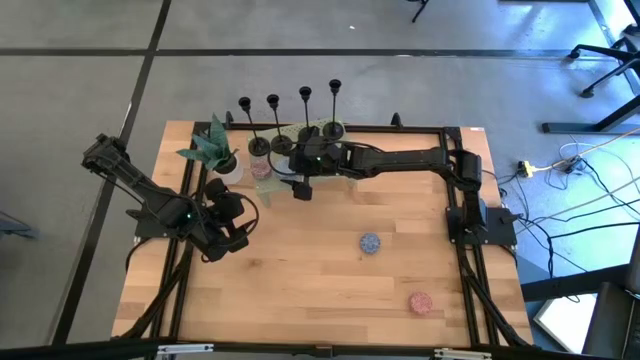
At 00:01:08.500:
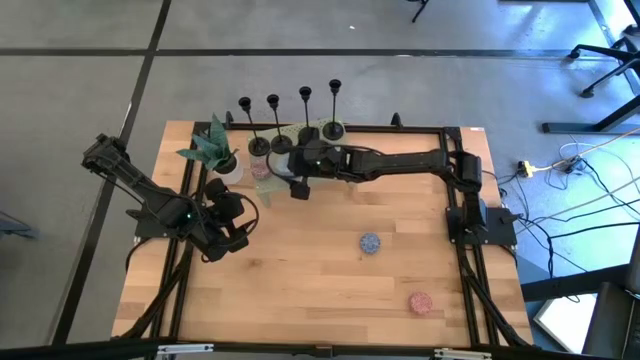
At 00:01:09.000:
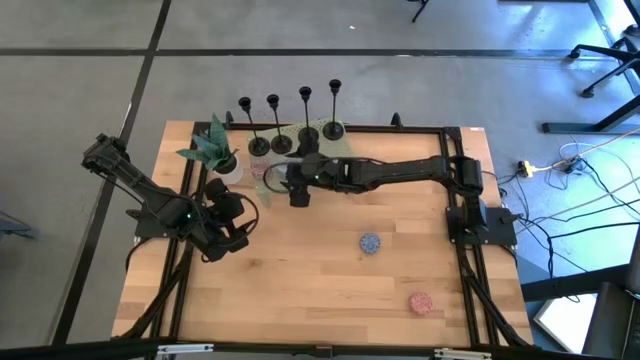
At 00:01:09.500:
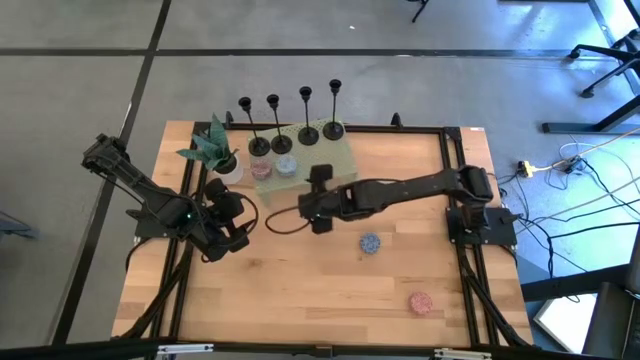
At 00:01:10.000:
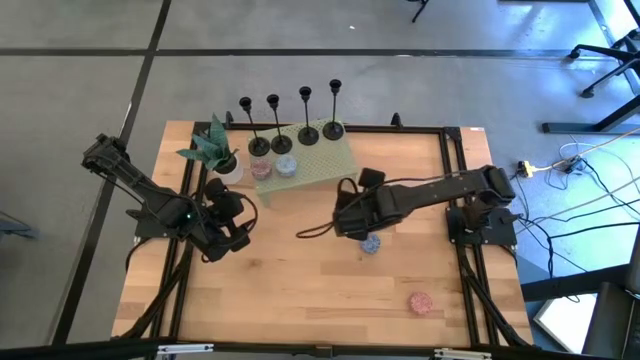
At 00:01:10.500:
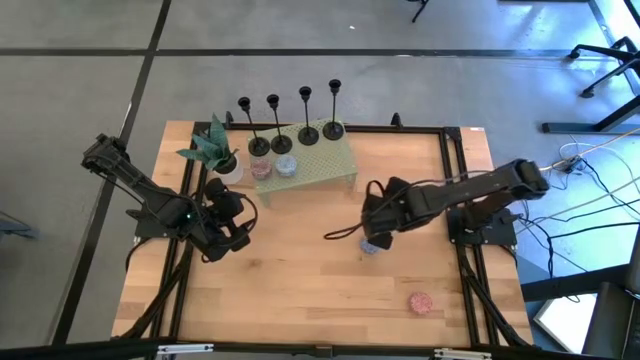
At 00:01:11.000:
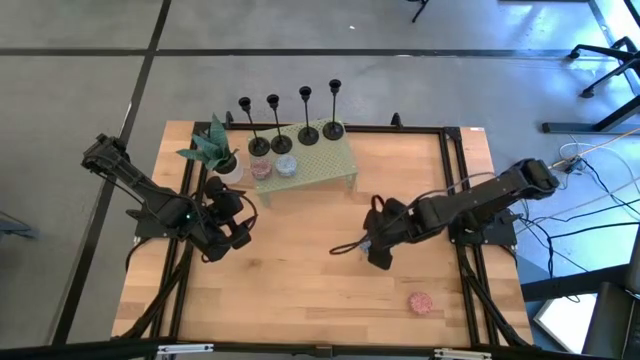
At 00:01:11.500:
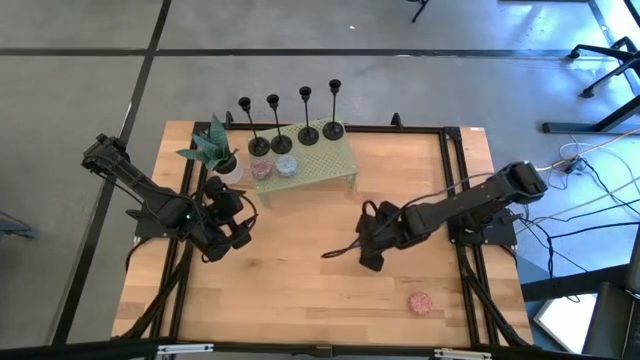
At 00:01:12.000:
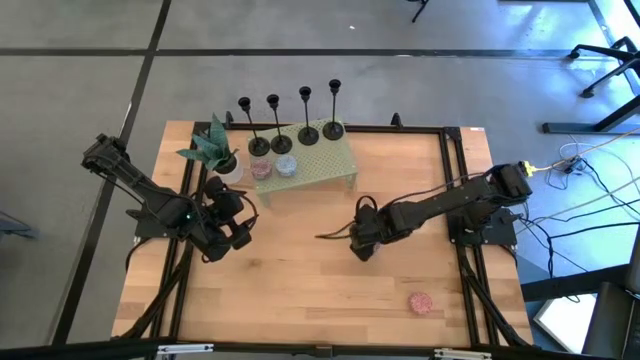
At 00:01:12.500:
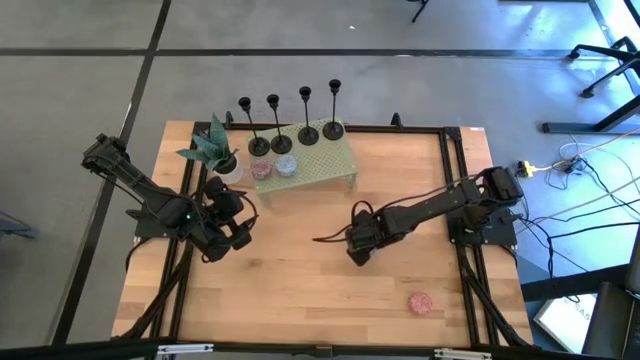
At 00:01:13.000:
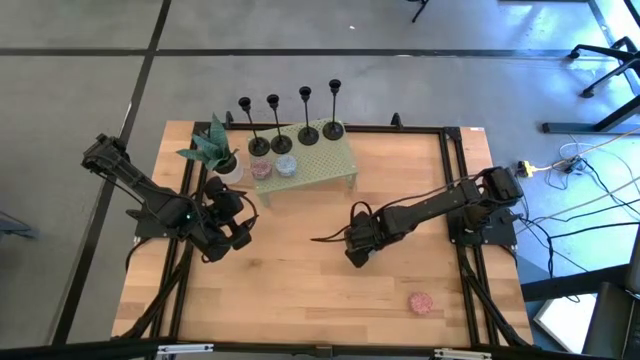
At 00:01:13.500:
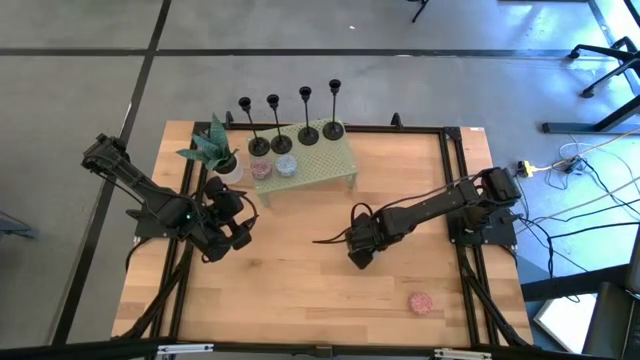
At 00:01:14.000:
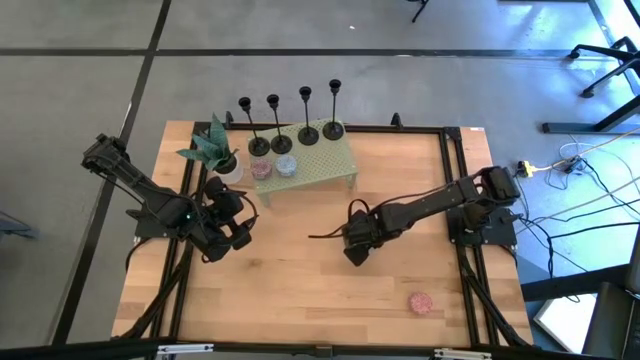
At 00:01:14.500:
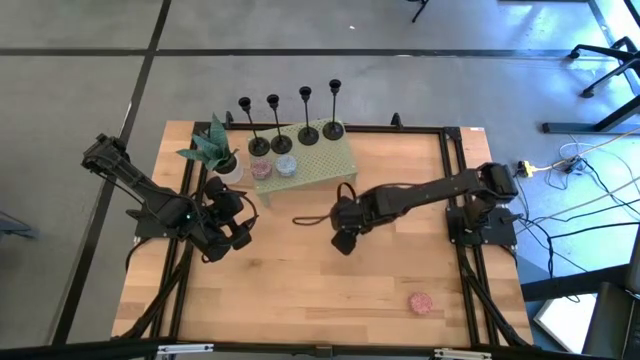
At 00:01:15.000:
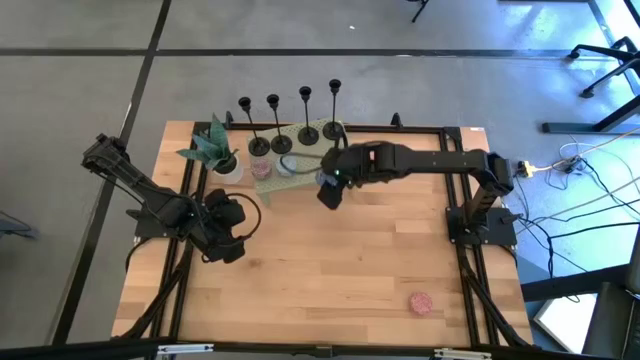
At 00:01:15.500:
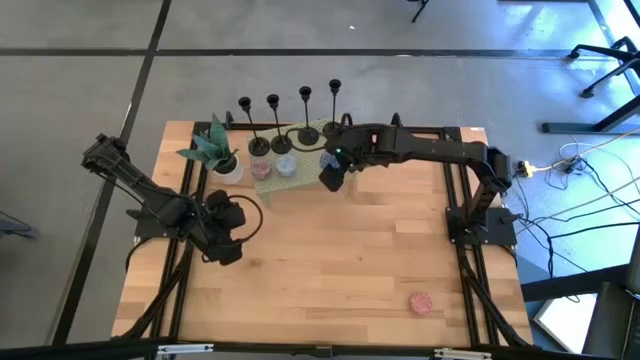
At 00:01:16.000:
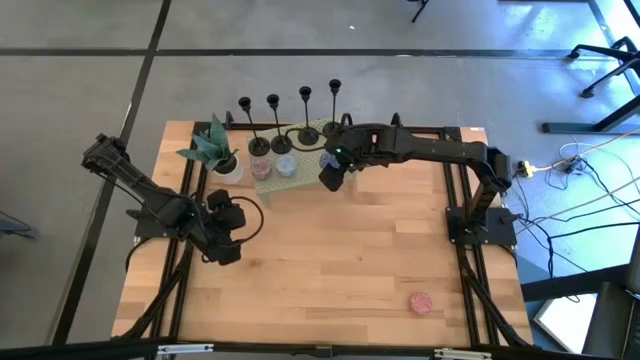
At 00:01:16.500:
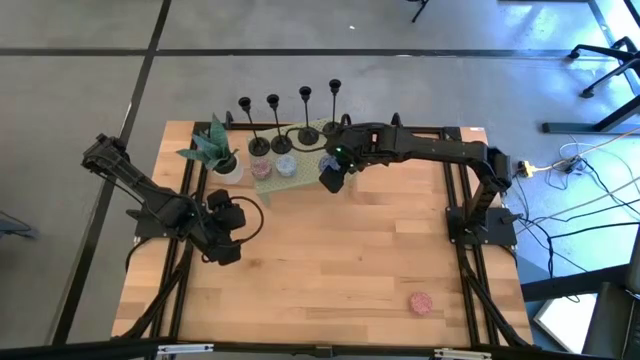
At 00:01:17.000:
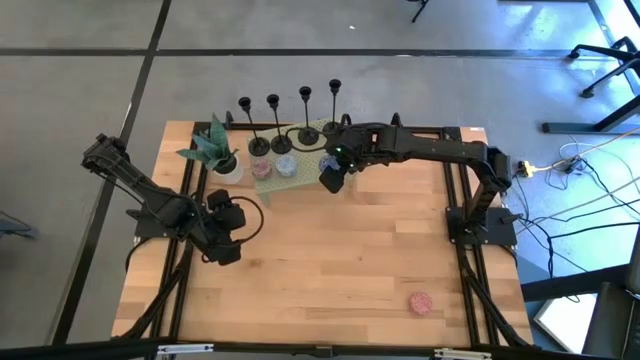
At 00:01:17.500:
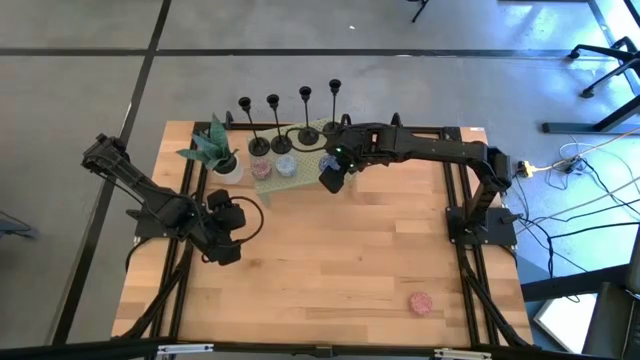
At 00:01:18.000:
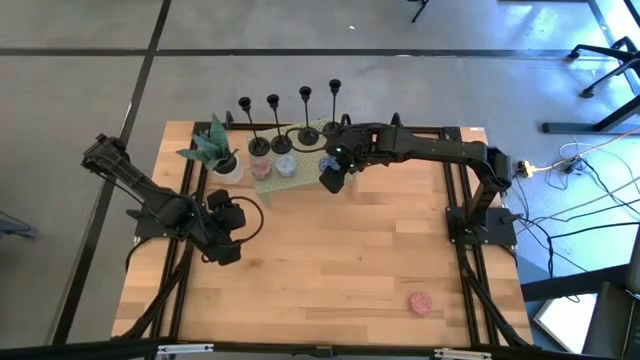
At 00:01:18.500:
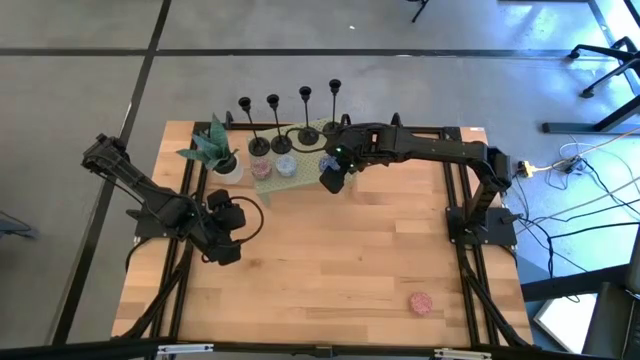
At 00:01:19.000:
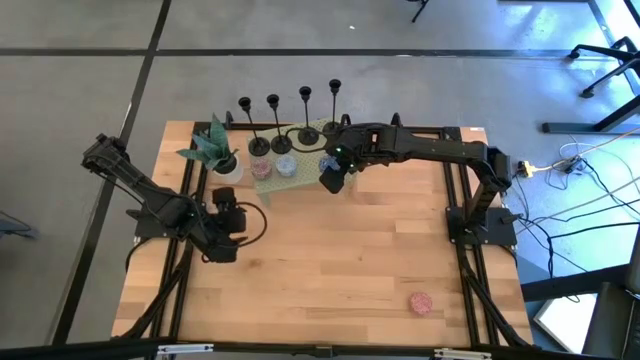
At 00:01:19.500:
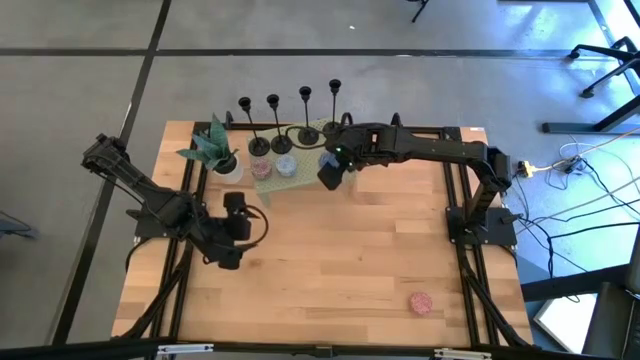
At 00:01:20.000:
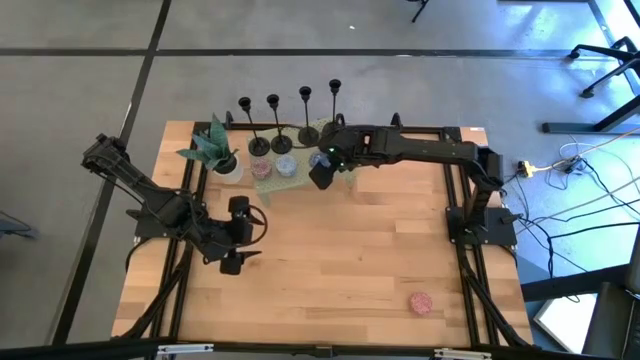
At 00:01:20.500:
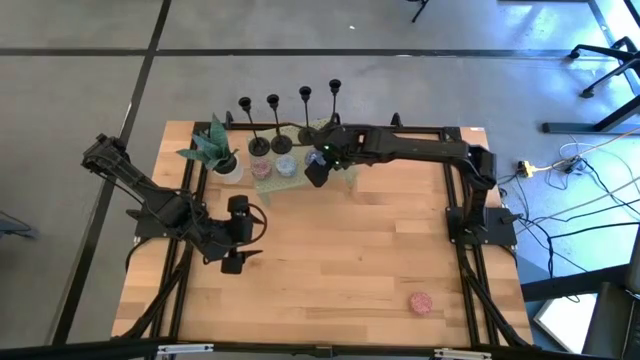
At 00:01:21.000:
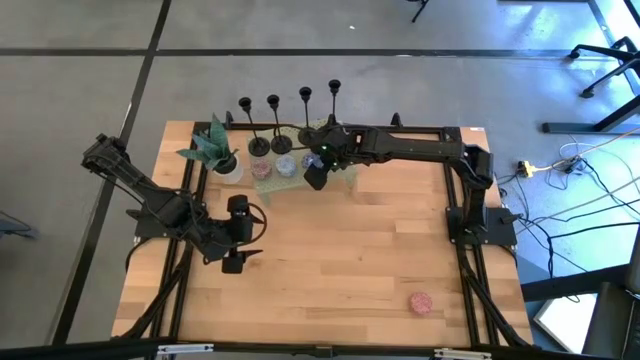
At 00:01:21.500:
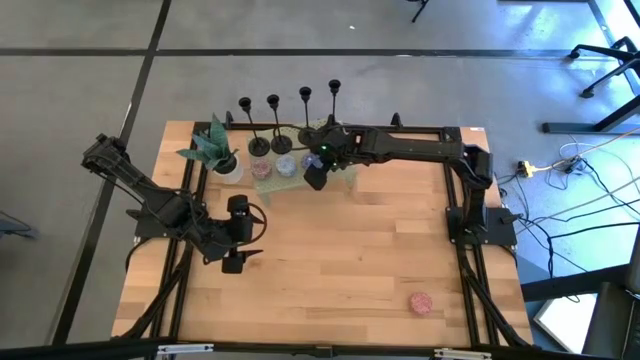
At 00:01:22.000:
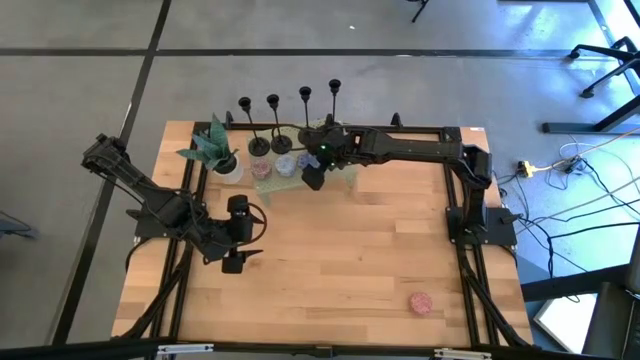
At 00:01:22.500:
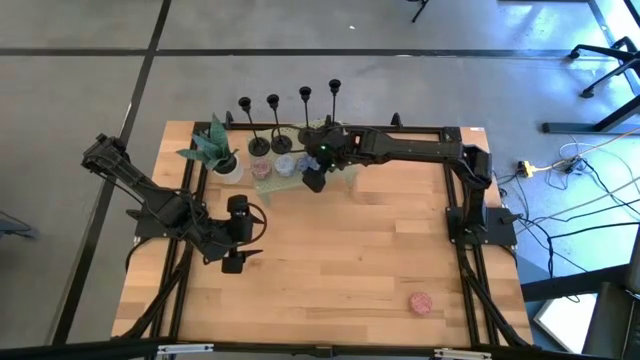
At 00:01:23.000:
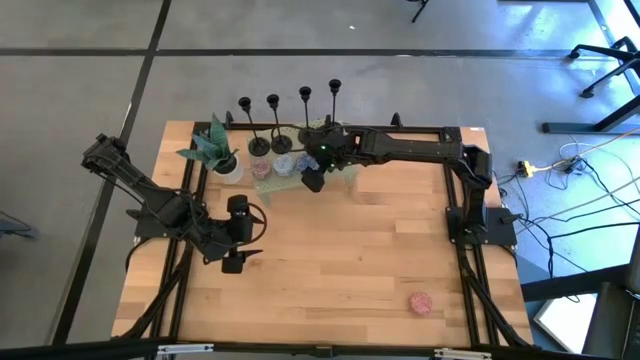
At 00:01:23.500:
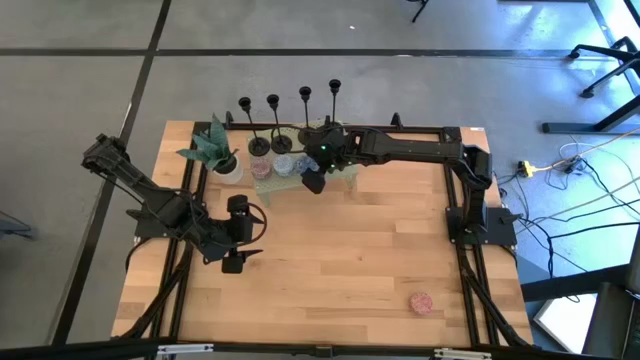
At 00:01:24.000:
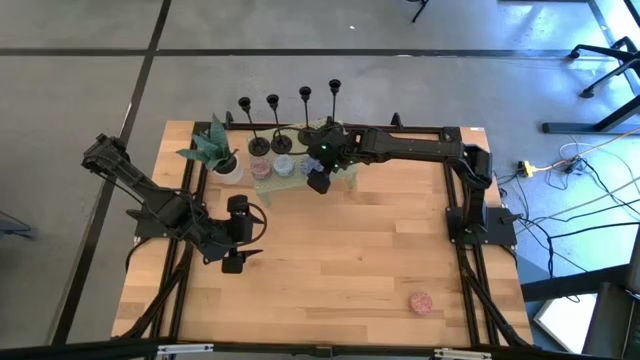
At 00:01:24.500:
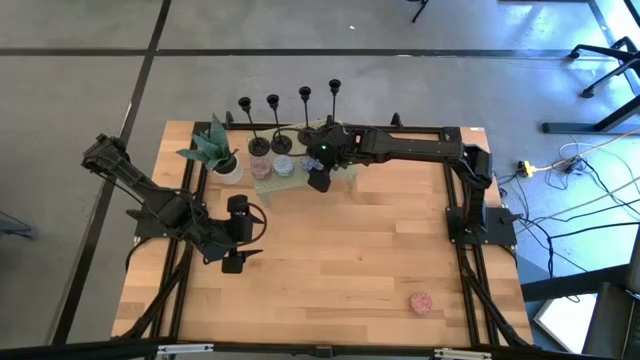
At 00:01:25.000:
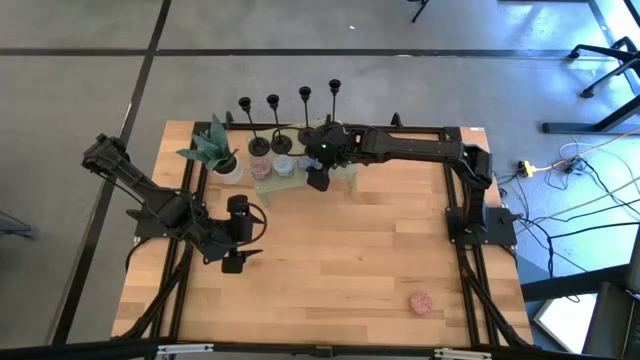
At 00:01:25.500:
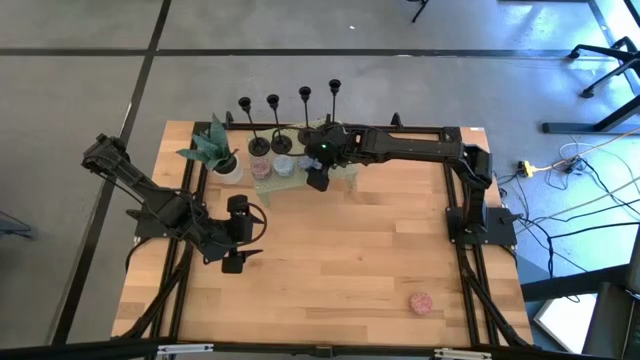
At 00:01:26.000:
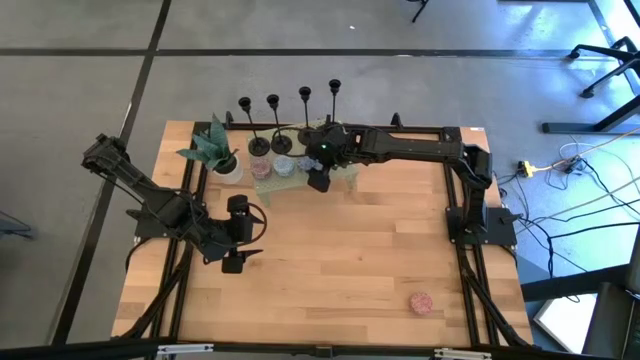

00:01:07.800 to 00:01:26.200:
Task: Pick & Place candle stick holders
Put the blue scented candle on the shelf

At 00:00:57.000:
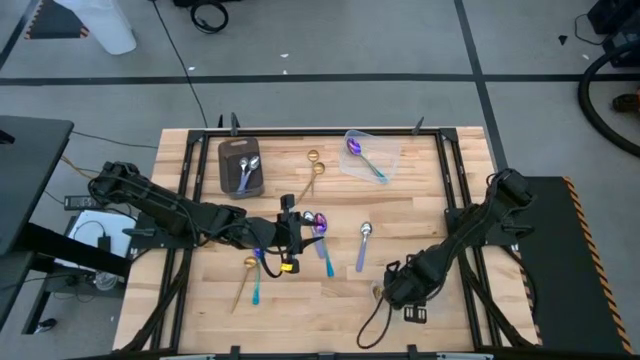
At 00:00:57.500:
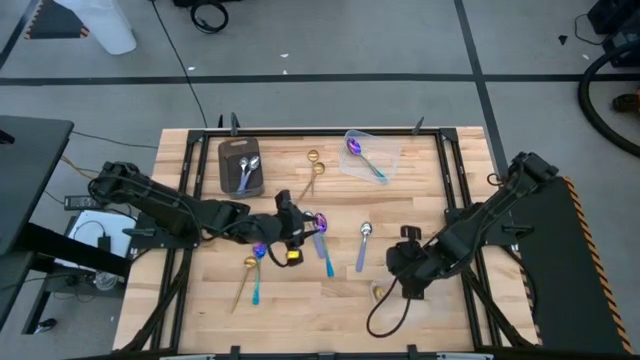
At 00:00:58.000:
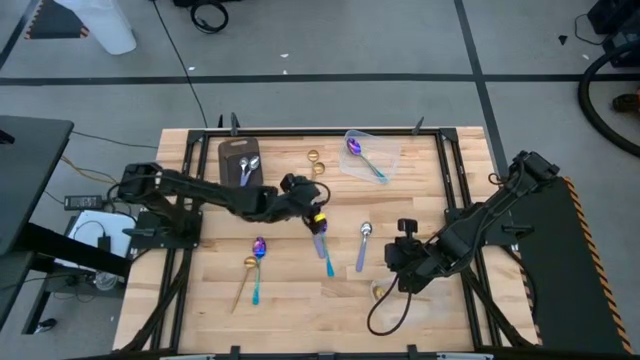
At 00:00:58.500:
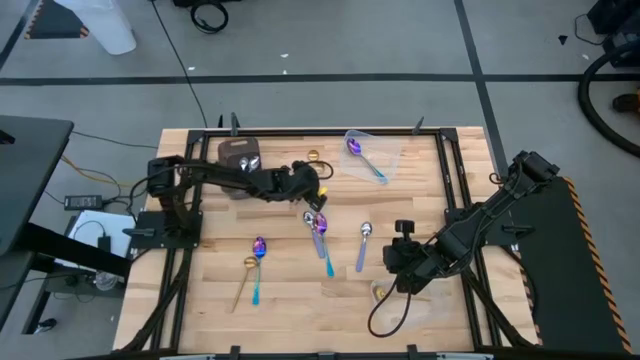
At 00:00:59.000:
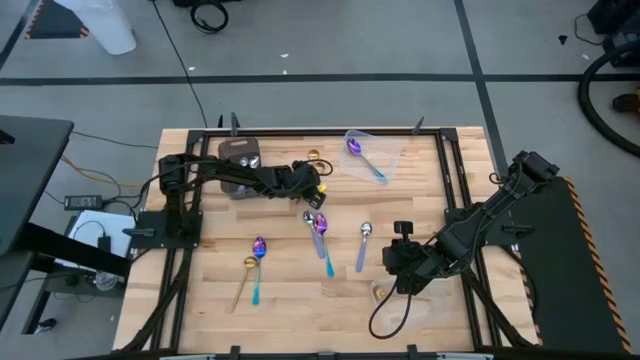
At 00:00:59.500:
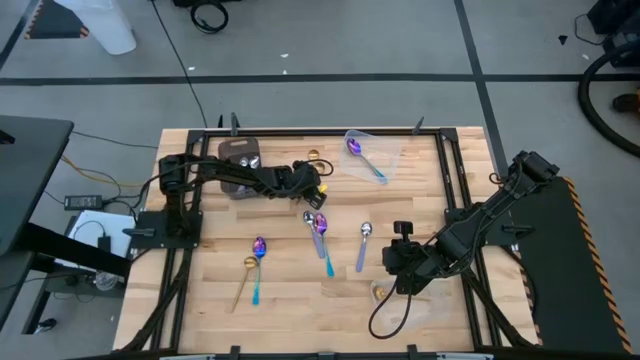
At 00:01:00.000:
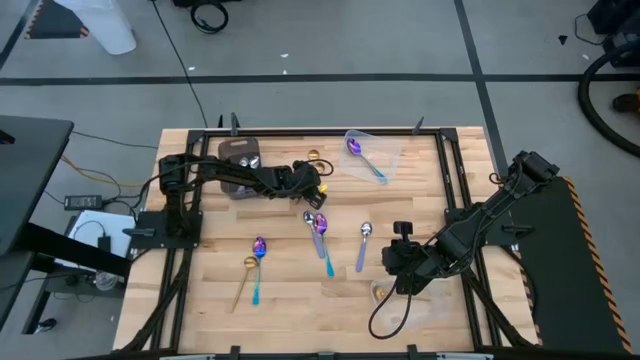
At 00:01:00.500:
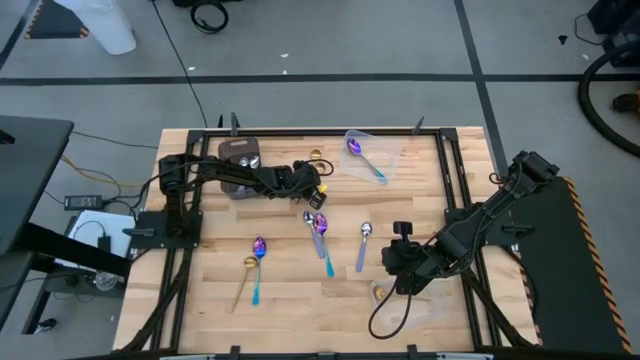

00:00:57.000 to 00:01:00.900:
Task: Sort silverware by color (type)
Put the yellow spoon into the bottom transparent bin
